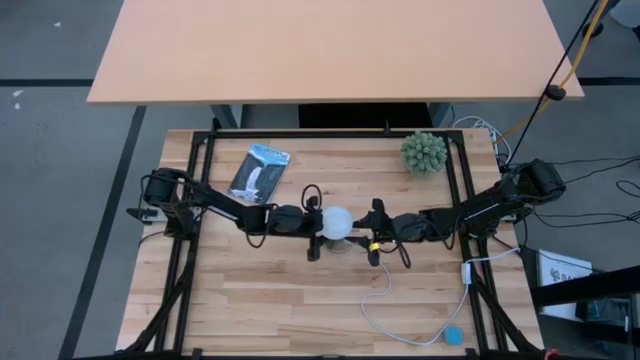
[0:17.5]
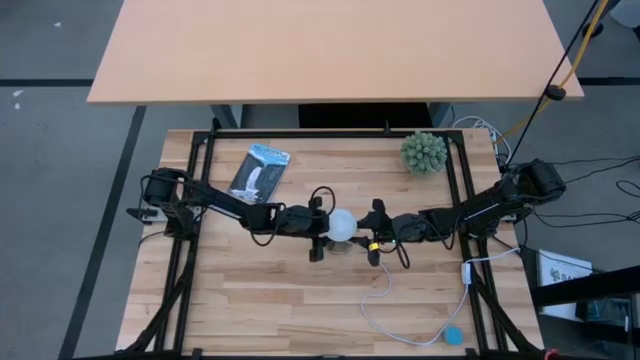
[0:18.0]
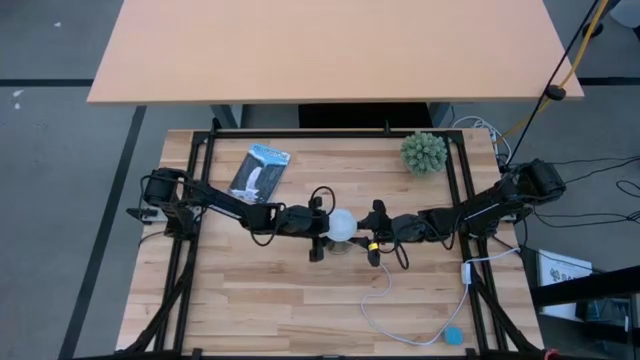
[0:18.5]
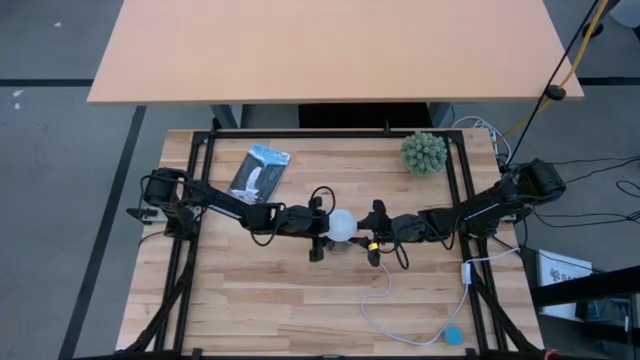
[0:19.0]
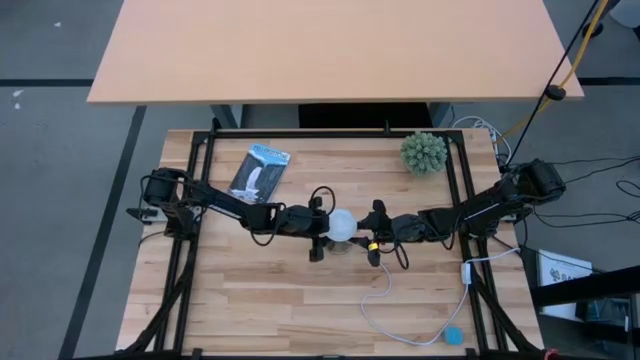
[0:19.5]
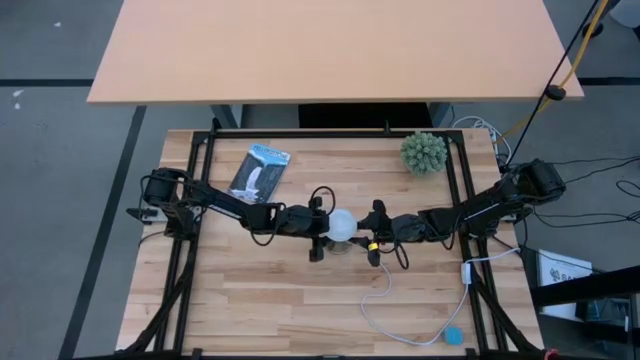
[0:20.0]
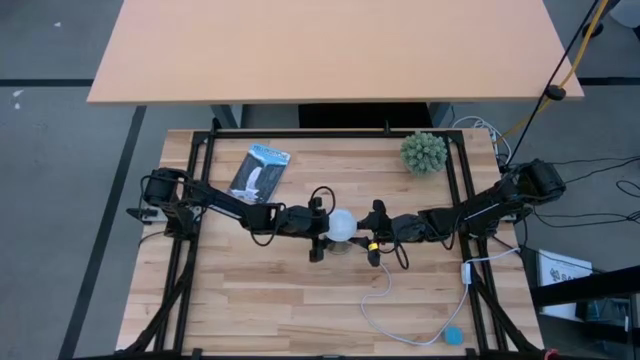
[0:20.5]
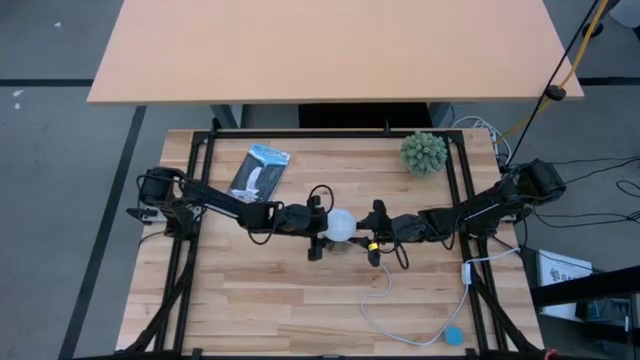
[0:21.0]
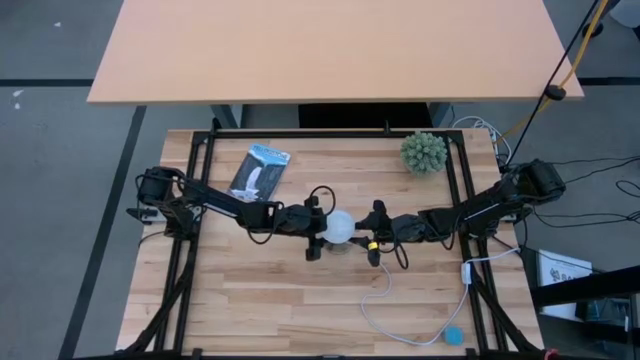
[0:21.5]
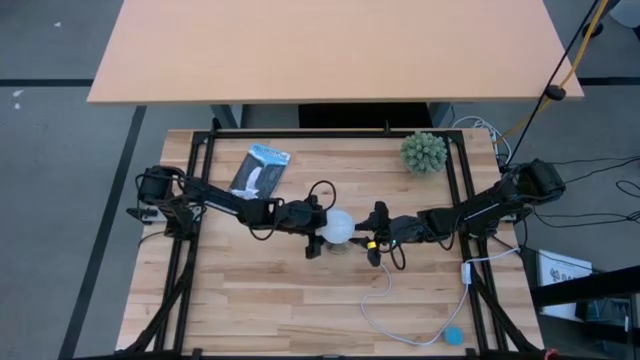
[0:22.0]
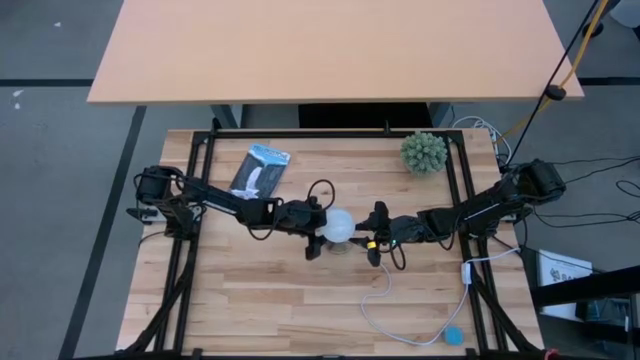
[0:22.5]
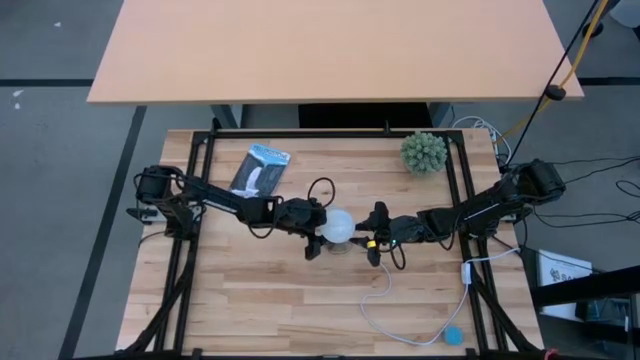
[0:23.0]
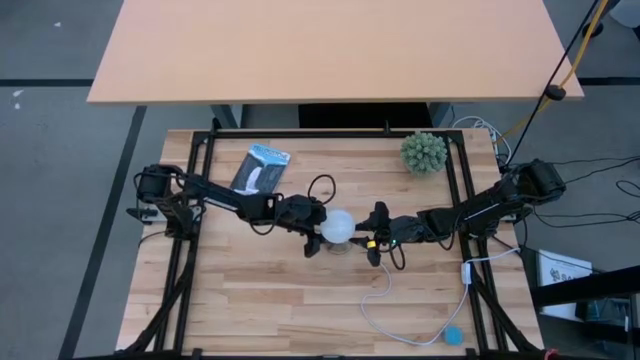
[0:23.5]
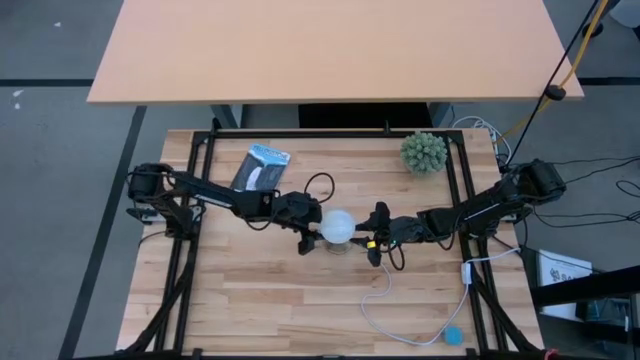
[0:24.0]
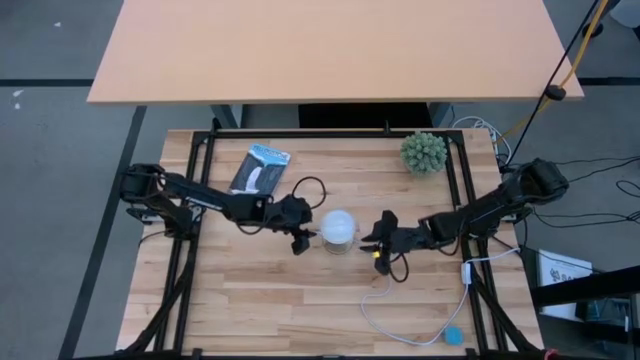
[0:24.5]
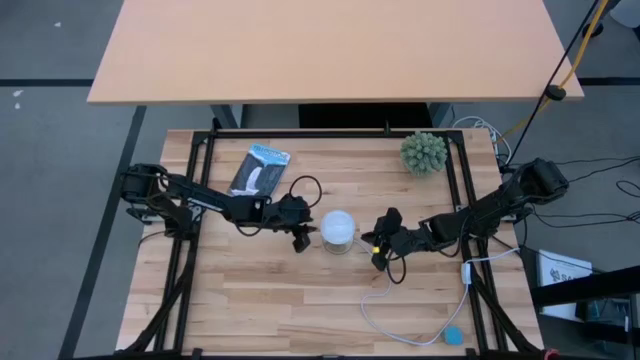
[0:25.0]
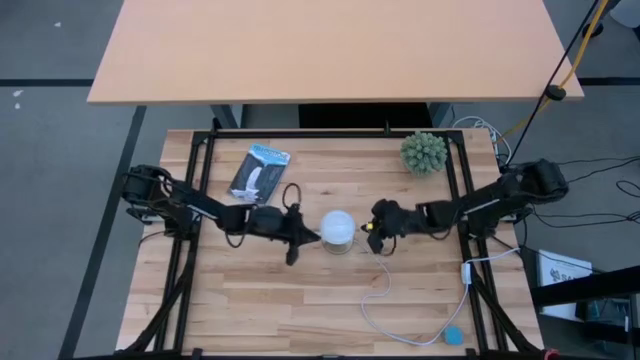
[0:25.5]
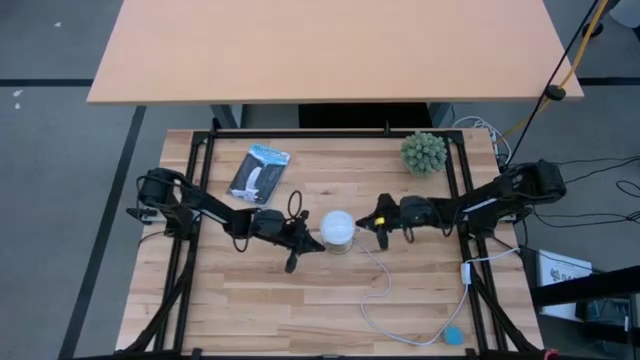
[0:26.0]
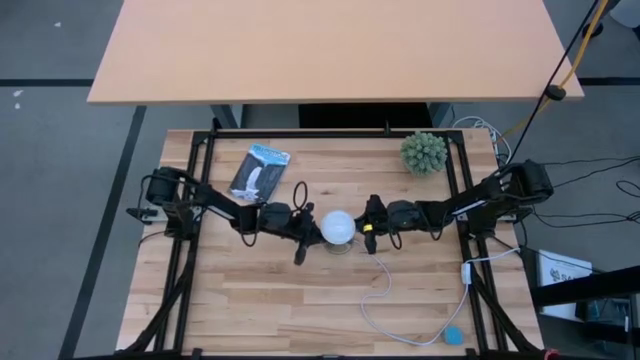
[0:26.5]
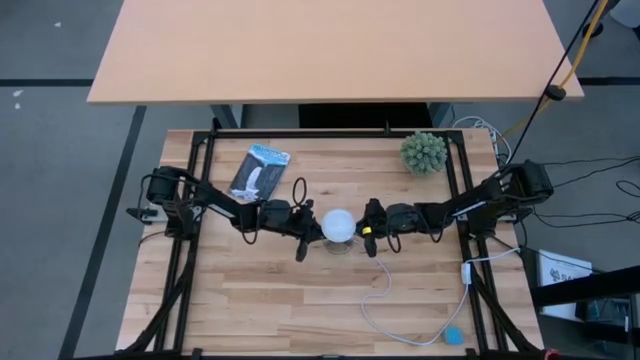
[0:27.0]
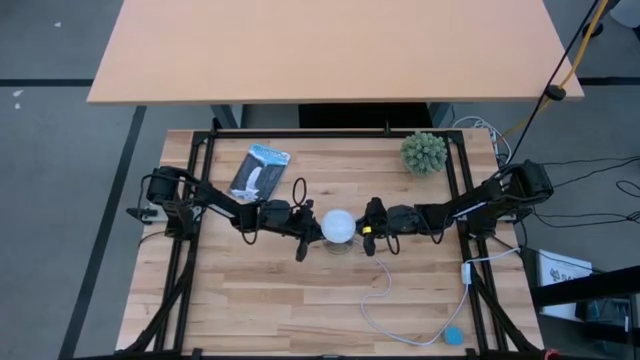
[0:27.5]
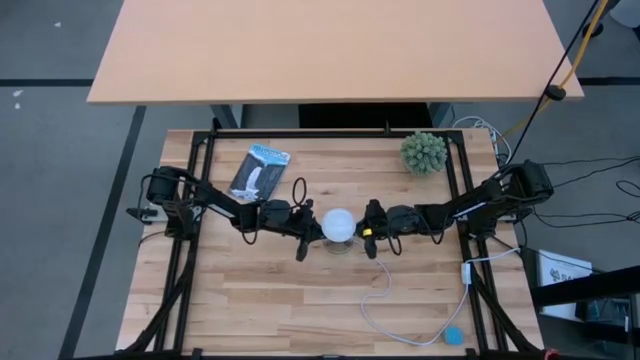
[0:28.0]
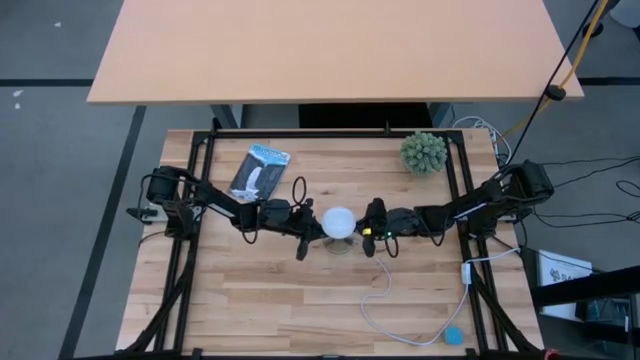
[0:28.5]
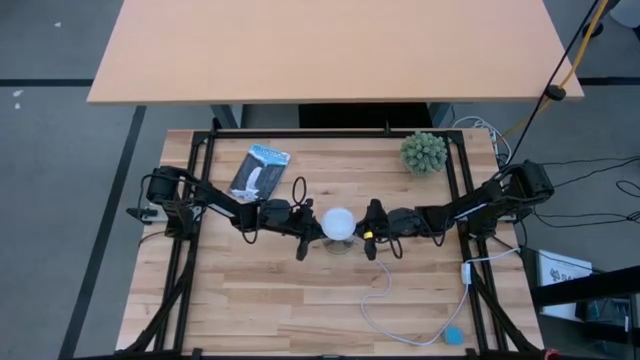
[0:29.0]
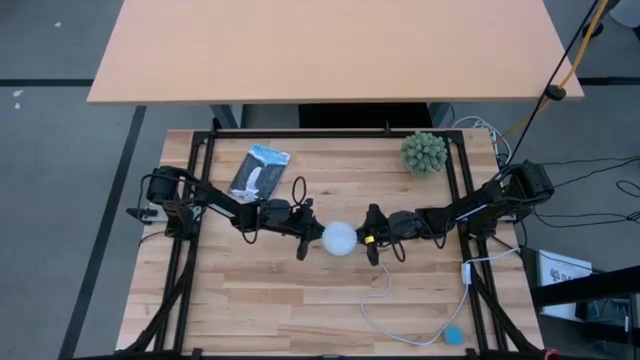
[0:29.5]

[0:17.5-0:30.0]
Task: Screw lightbulb
Insert the white lightbulb into the gold lamp

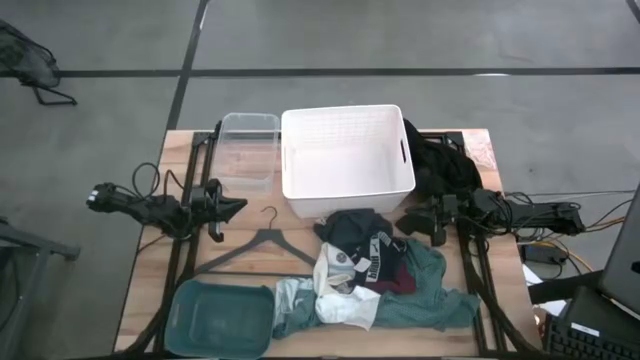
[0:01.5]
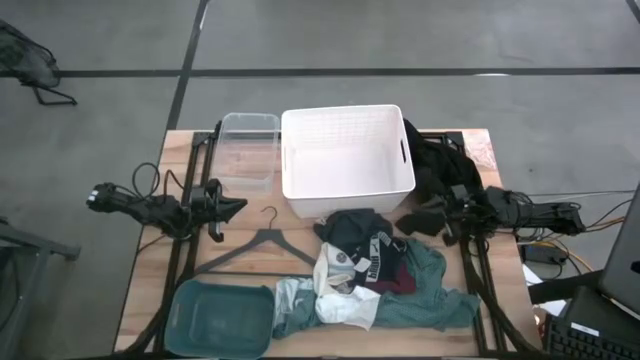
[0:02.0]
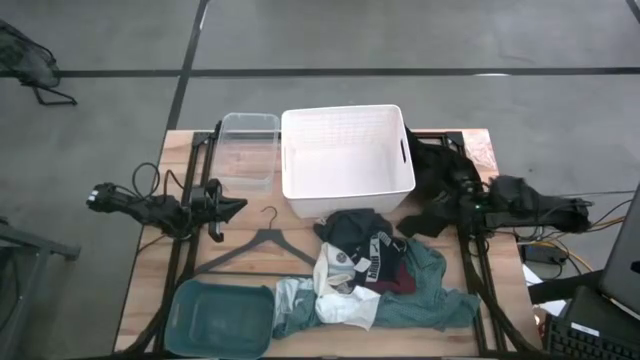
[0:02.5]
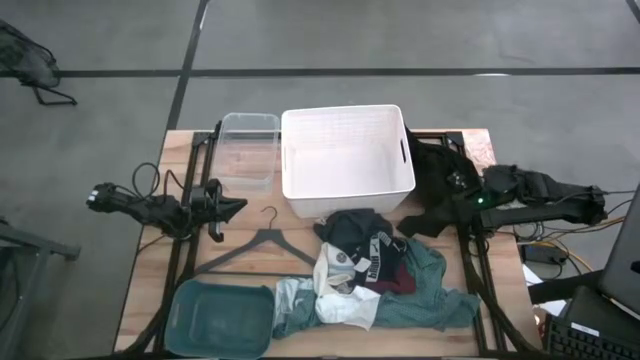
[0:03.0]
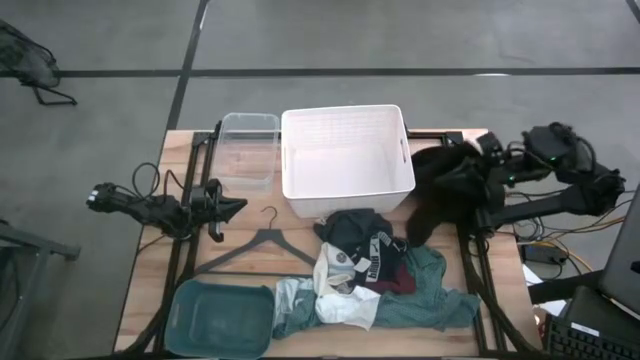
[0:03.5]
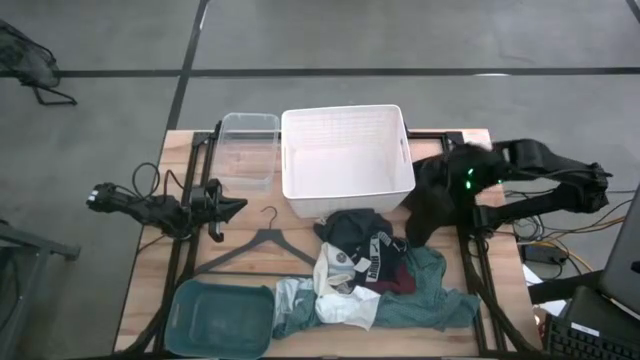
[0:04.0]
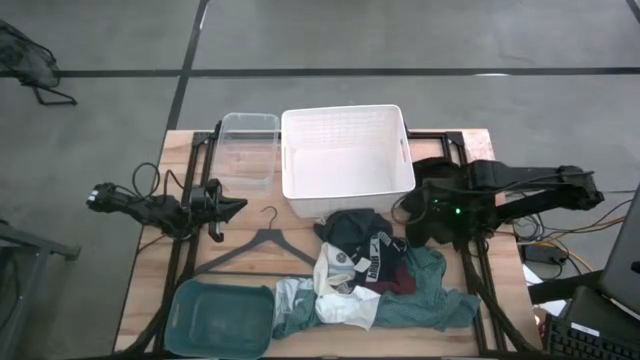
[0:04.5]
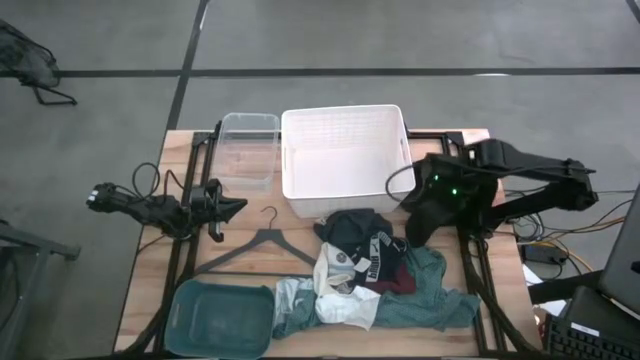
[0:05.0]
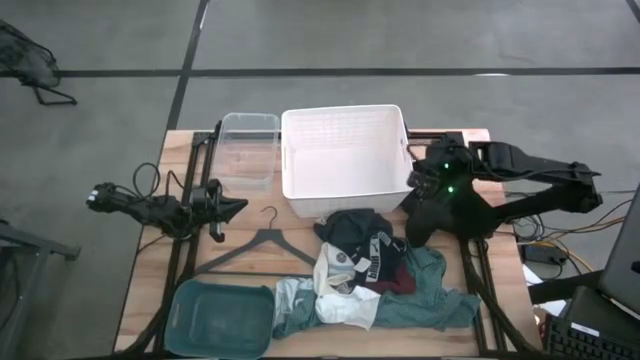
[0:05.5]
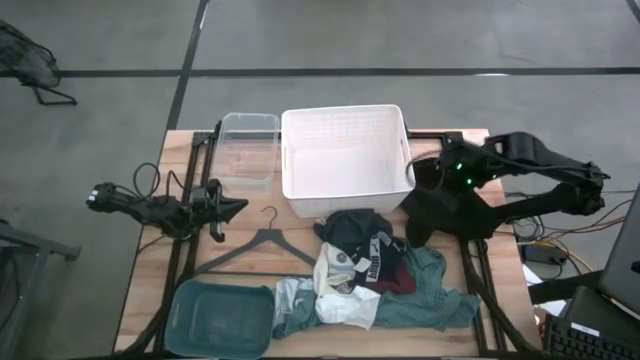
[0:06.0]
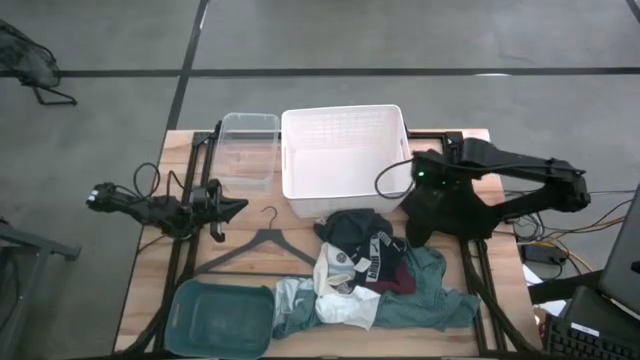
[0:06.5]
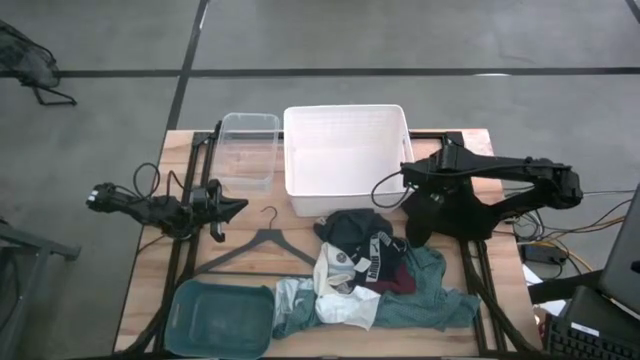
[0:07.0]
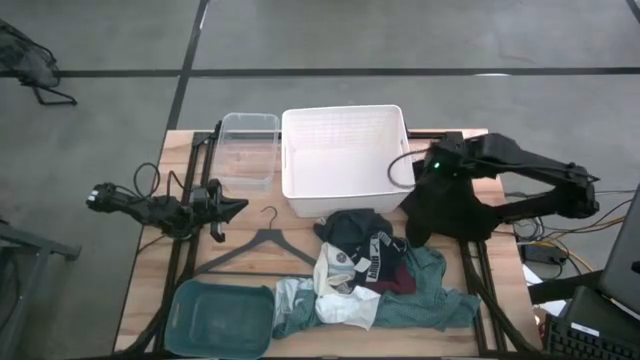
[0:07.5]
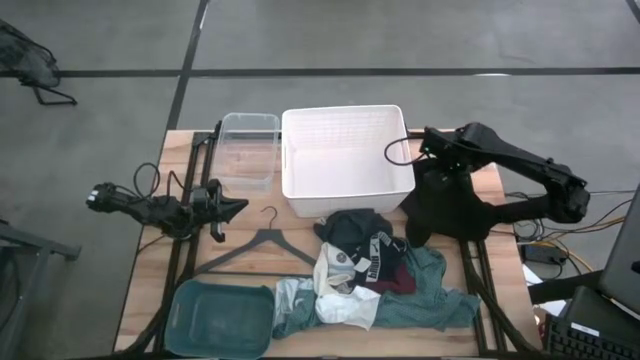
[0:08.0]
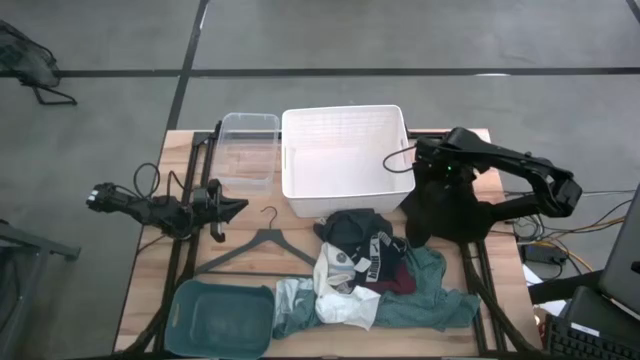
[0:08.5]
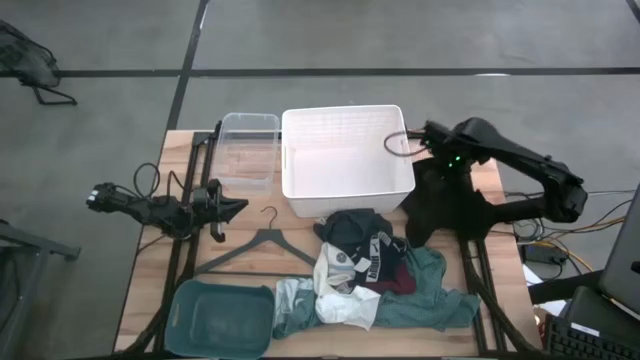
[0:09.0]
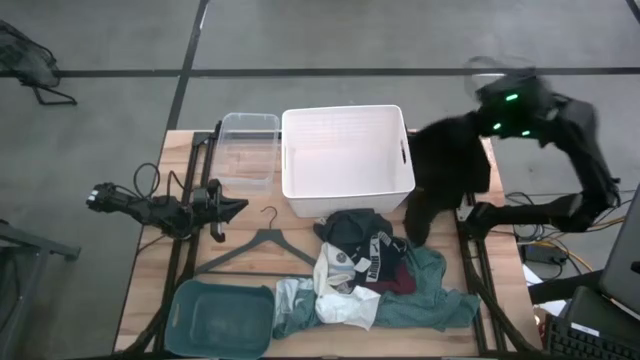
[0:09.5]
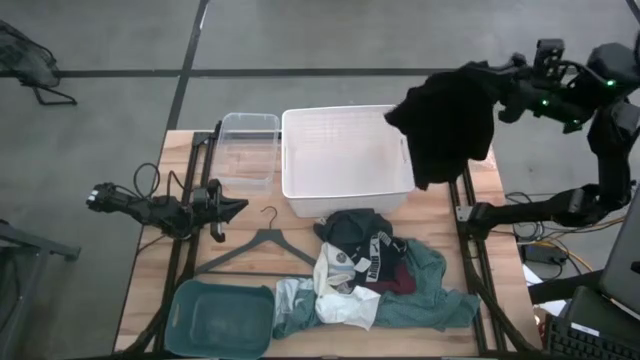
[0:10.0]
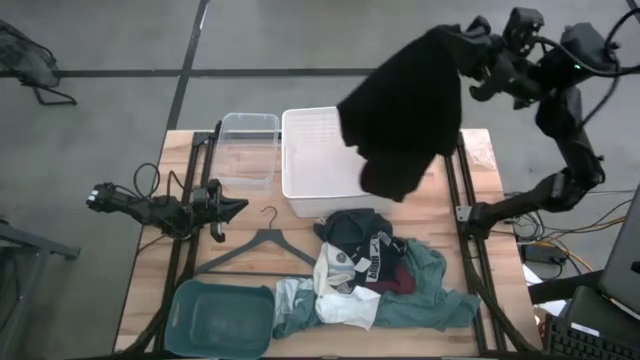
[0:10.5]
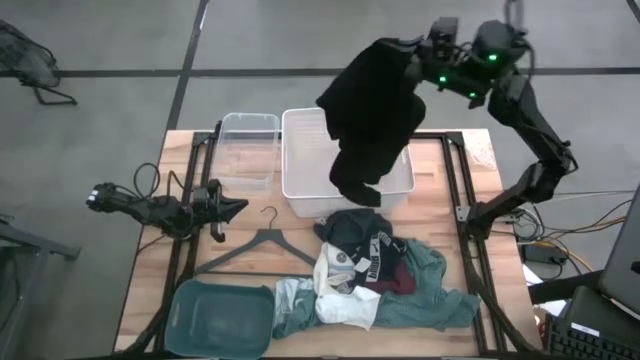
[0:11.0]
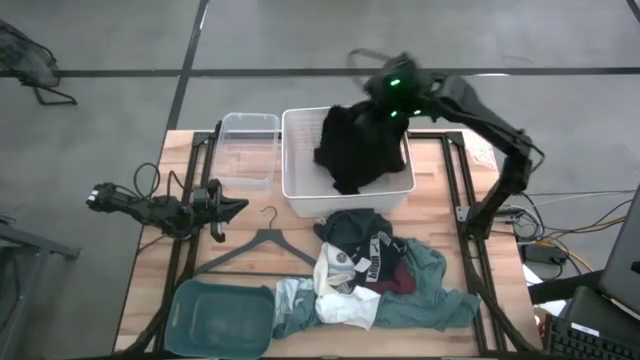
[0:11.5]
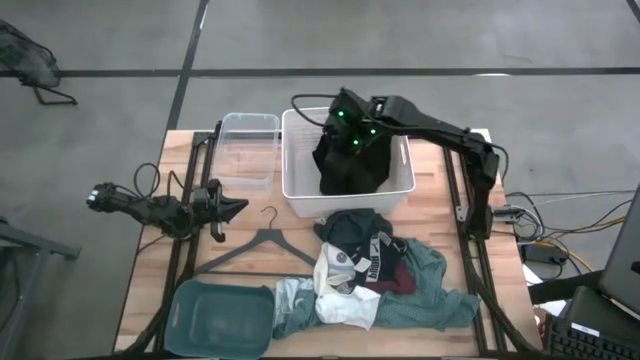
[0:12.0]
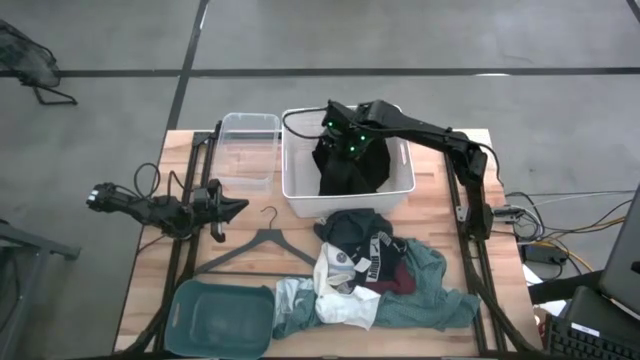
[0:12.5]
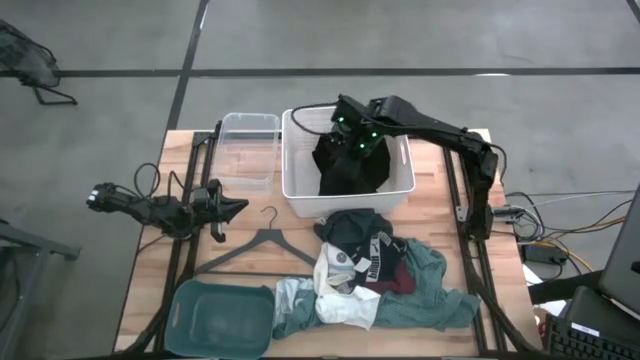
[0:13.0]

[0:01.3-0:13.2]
Task: Pick & Place Cloths
Put the black t-shirt into the white bin
